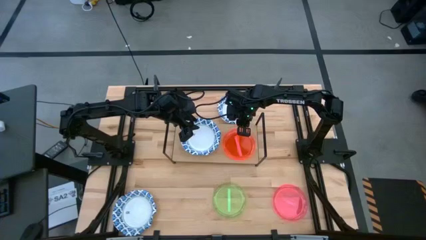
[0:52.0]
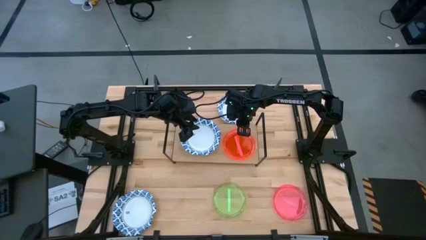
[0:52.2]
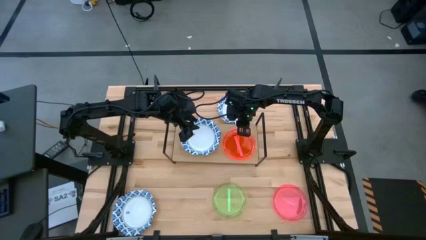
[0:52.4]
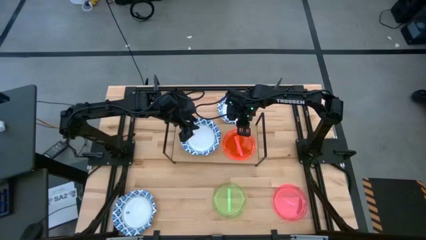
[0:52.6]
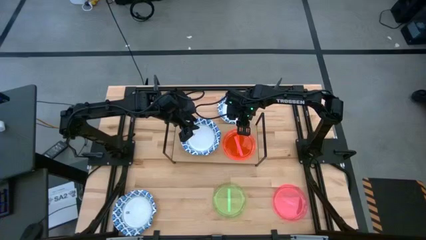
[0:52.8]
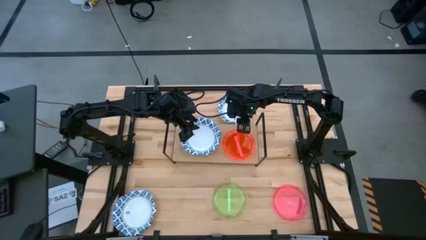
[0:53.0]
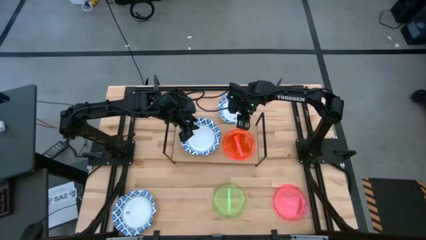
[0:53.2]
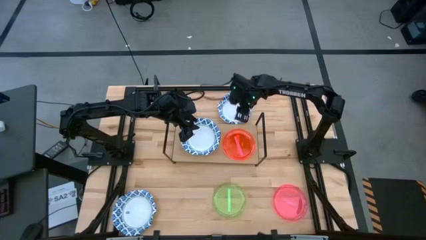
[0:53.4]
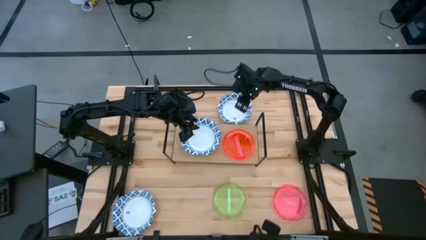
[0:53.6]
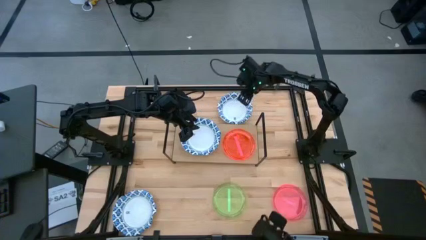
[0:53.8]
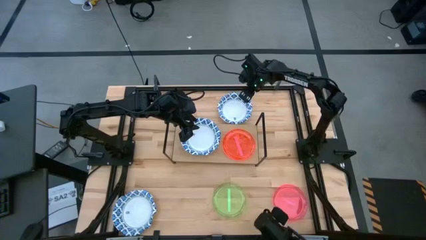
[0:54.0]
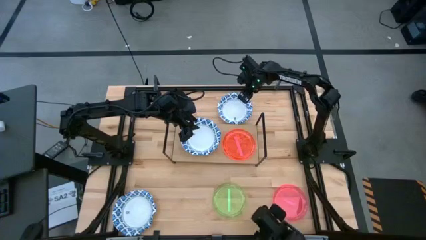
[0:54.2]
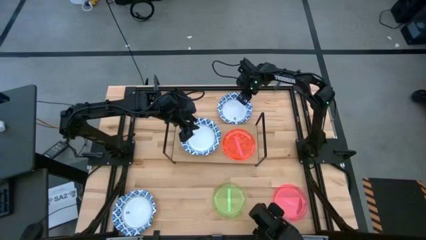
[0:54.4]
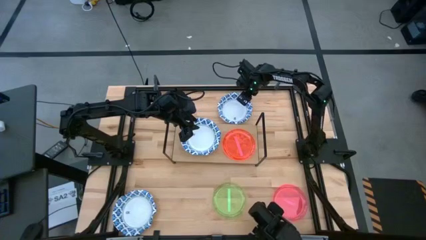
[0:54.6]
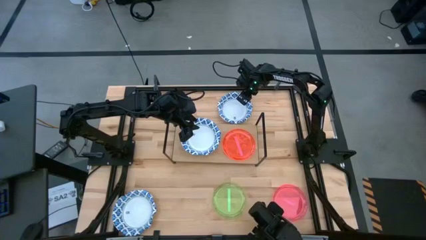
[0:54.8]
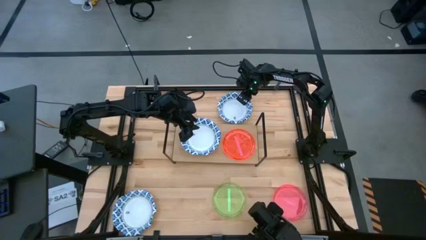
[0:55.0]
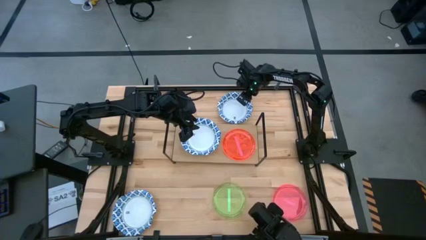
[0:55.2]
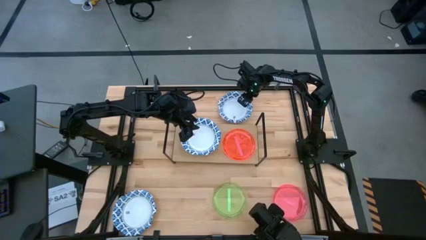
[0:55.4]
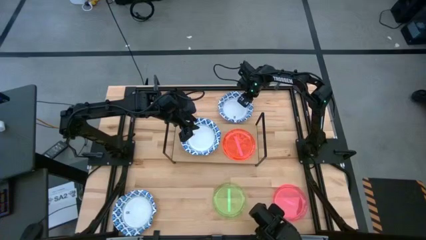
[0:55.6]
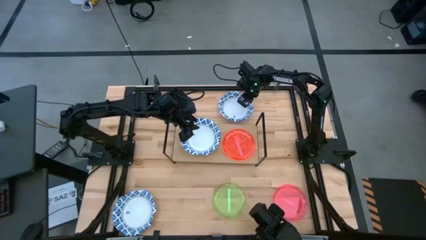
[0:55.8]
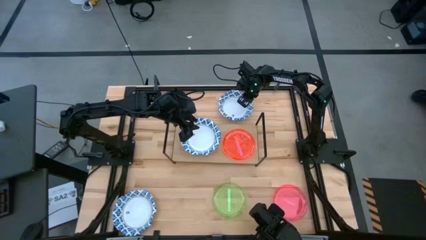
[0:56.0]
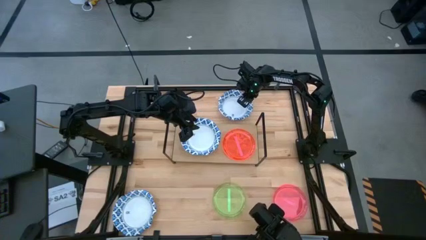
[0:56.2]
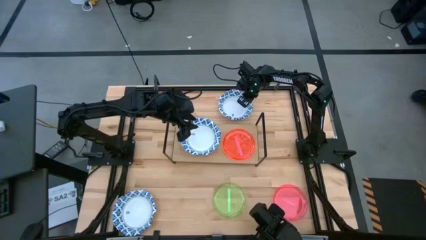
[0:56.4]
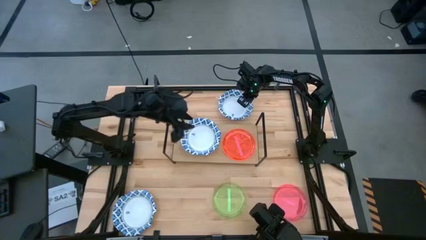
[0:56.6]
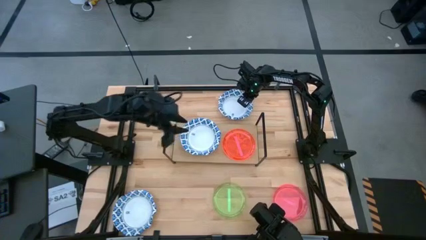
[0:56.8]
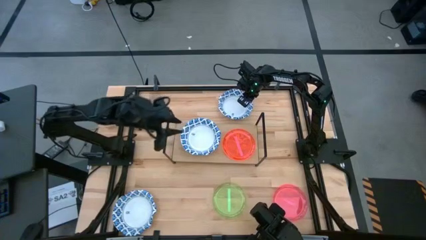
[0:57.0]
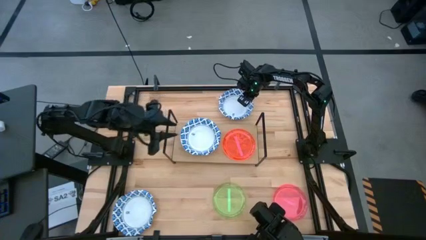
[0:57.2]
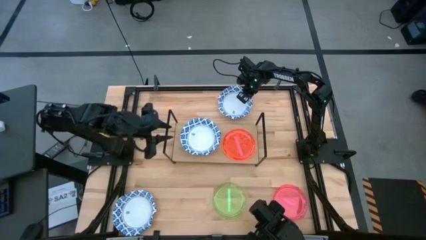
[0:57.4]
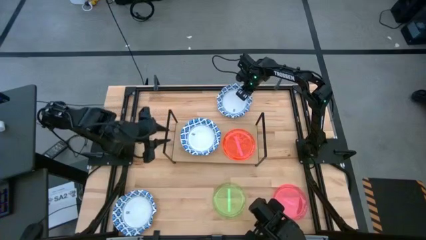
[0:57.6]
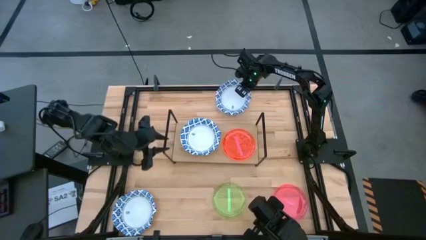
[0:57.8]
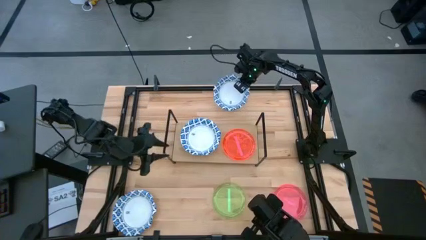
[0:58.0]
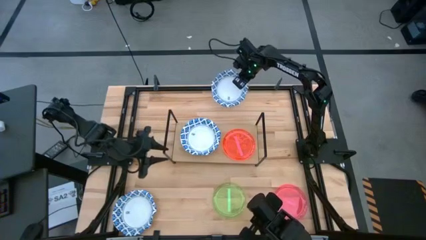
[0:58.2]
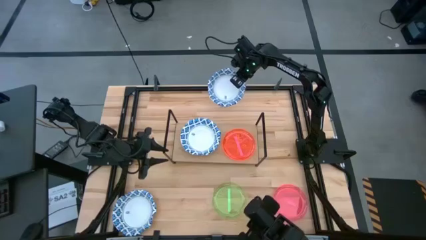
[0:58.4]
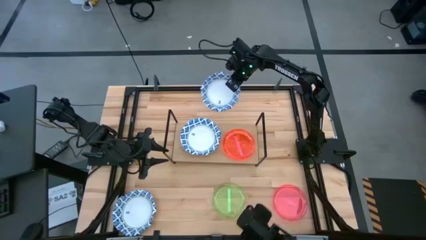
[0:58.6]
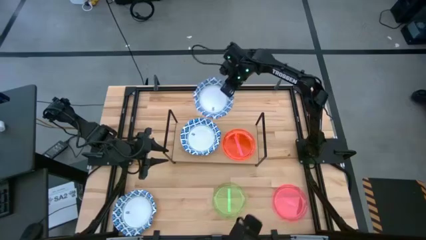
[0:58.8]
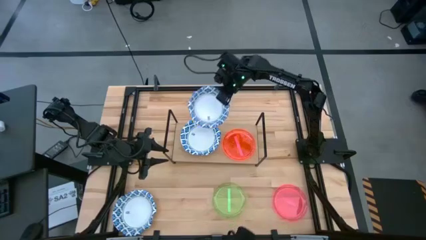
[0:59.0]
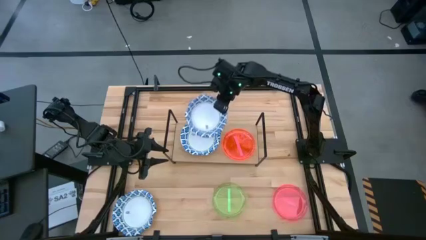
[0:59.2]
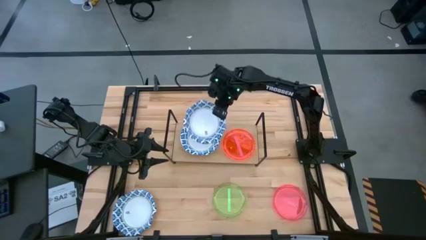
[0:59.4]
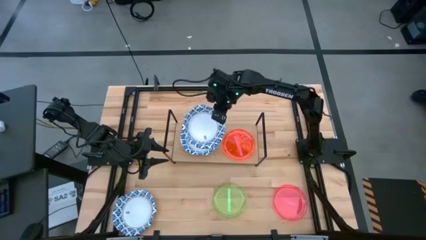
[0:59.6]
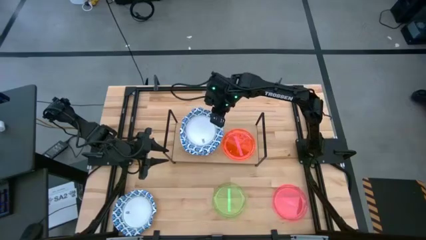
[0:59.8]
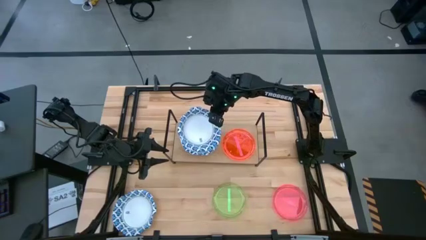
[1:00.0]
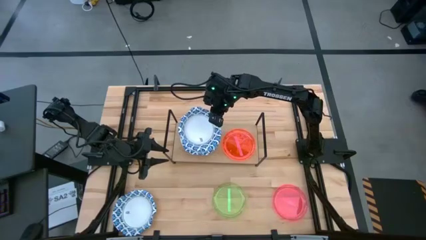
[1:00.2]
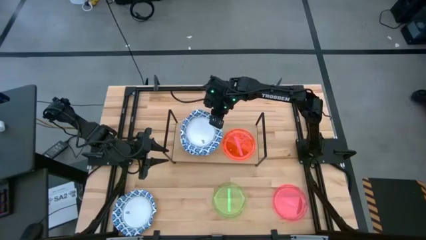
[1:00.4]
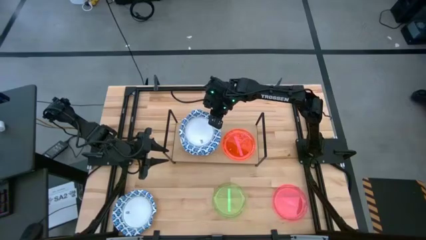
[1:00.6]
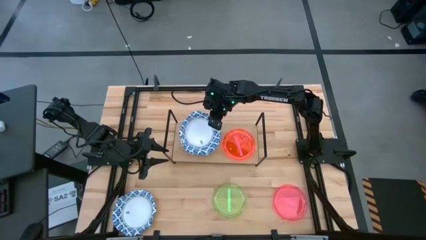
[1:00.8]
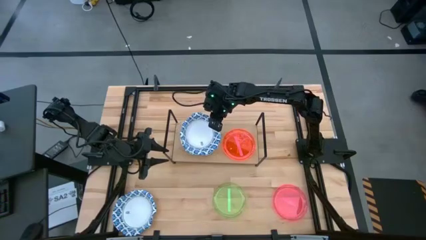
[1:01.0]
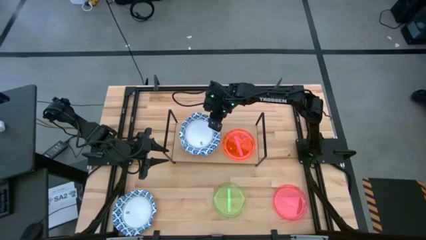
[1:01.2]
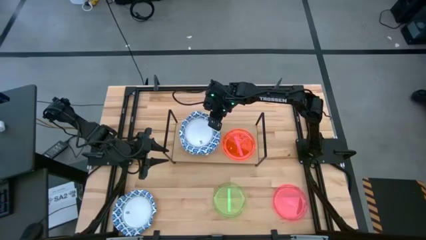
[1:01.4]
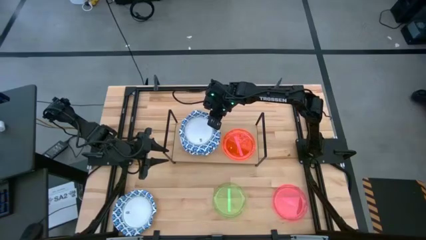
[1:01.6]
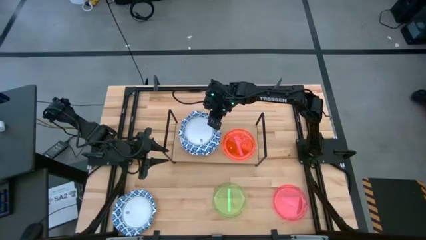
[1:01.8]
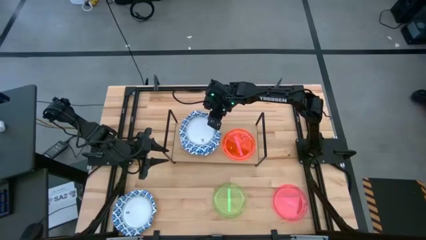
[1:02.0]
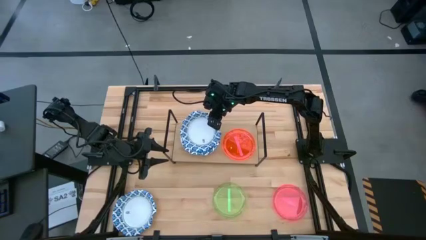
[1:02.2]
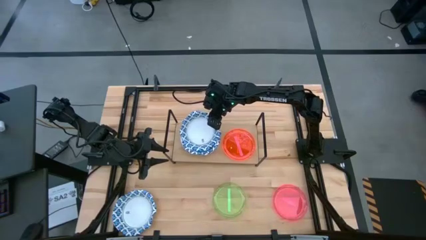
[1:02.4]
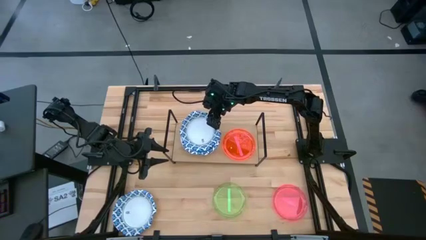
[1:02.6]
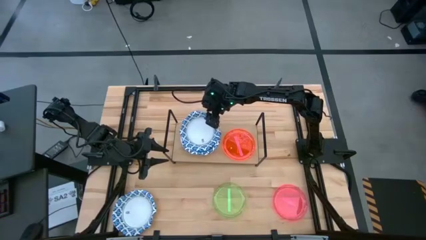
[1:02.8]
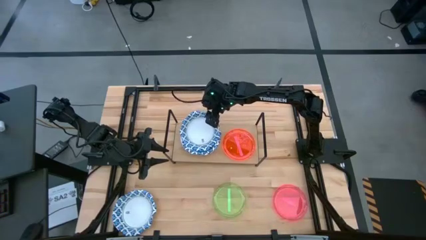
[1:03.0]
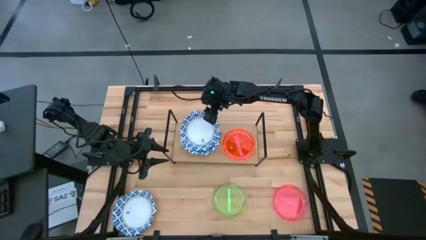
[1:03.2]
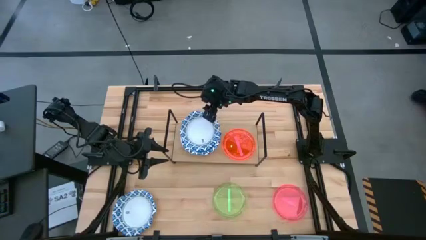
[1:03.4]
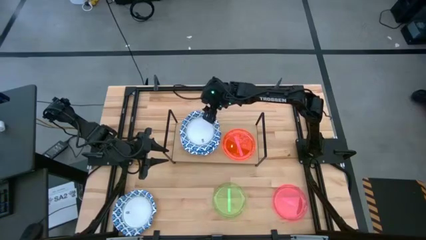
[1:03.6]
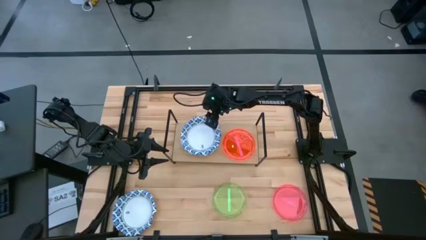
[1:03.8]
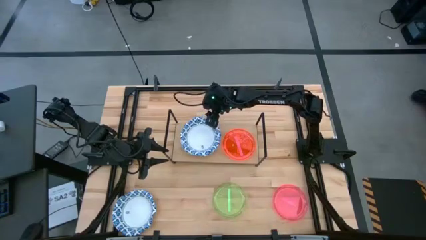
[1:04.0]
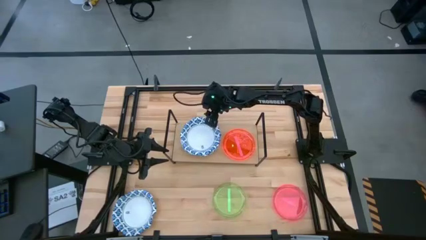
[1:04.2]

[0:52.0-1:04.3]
Task: Place and stack plates onto a shelf
Stack the blue patterned bowl on top of the blue patterned bowl on the shelf

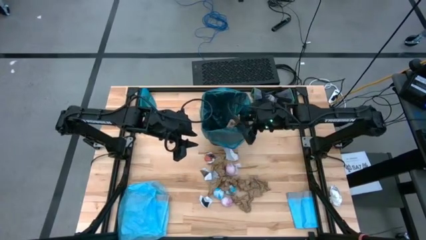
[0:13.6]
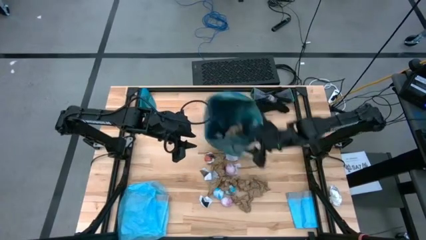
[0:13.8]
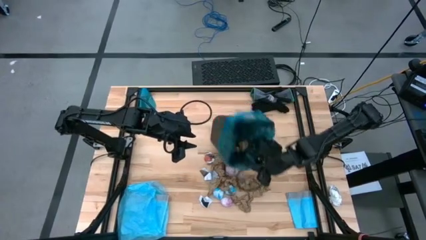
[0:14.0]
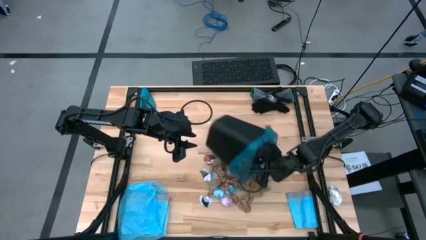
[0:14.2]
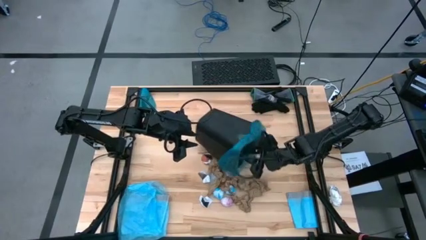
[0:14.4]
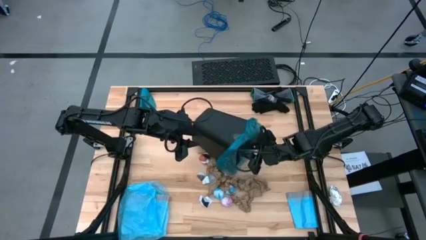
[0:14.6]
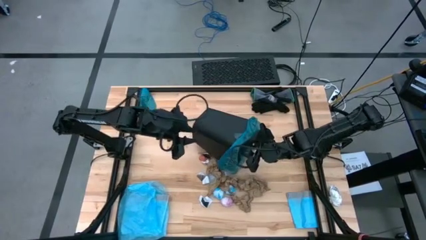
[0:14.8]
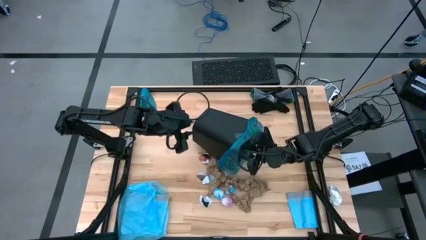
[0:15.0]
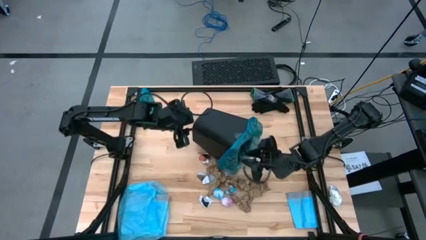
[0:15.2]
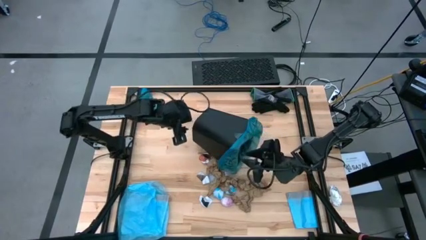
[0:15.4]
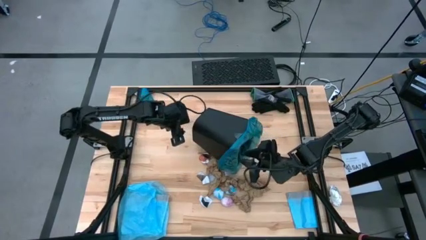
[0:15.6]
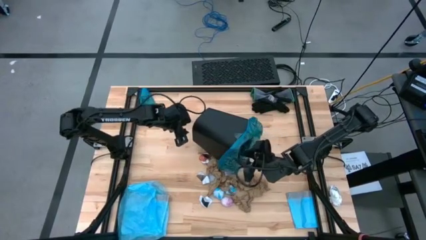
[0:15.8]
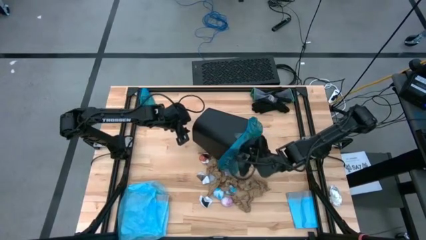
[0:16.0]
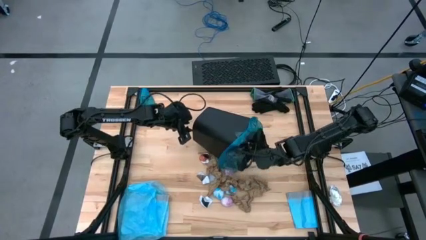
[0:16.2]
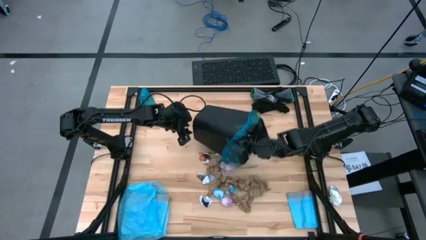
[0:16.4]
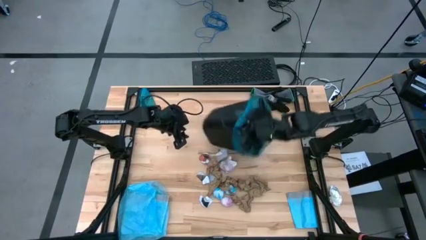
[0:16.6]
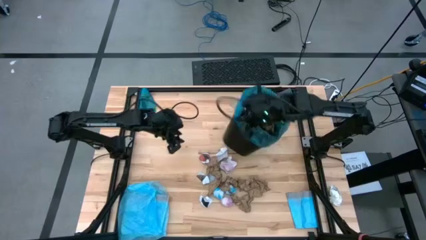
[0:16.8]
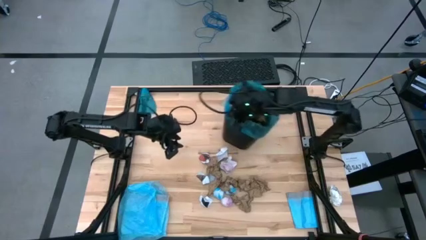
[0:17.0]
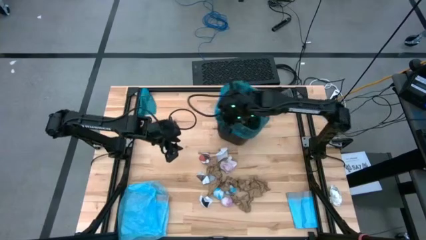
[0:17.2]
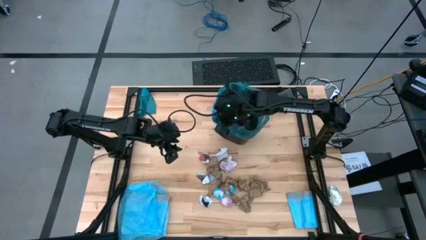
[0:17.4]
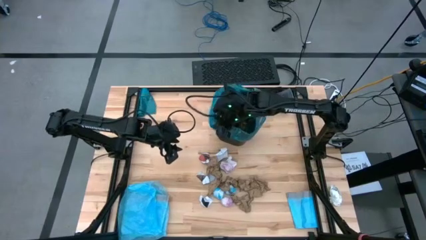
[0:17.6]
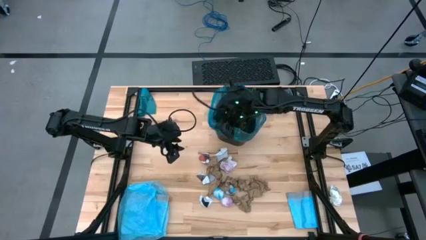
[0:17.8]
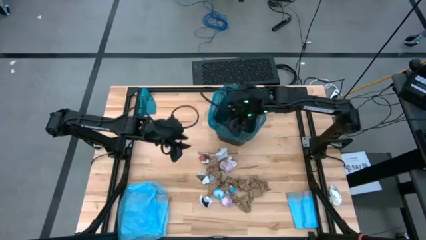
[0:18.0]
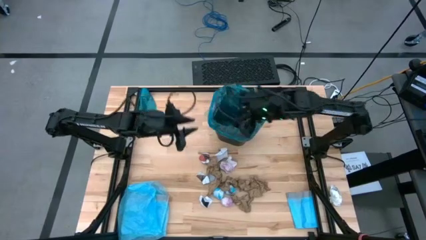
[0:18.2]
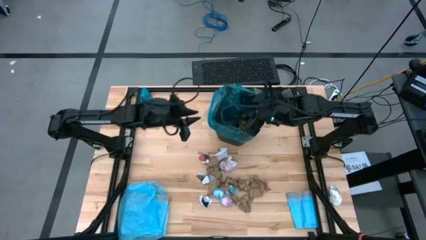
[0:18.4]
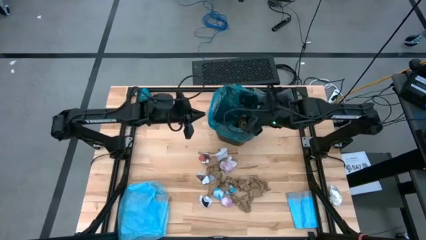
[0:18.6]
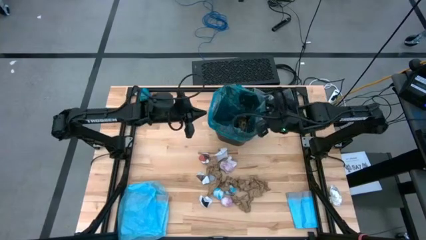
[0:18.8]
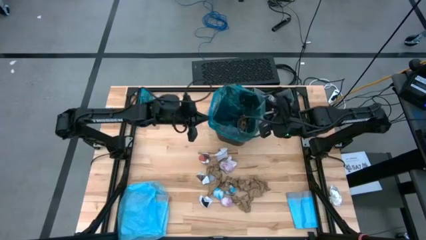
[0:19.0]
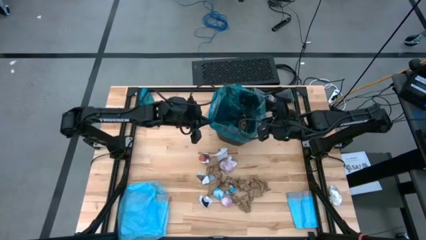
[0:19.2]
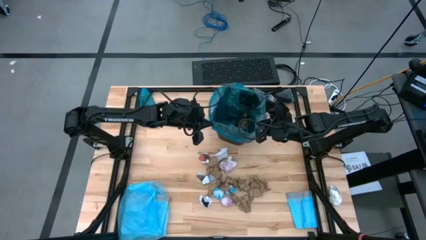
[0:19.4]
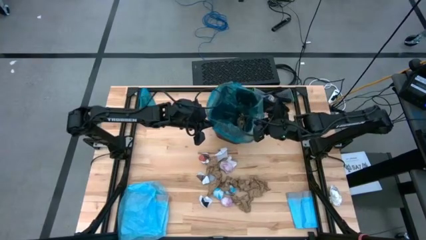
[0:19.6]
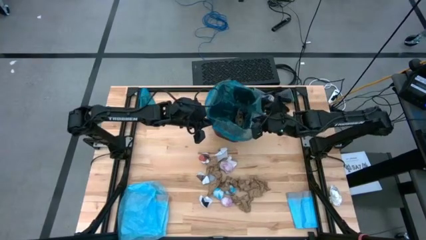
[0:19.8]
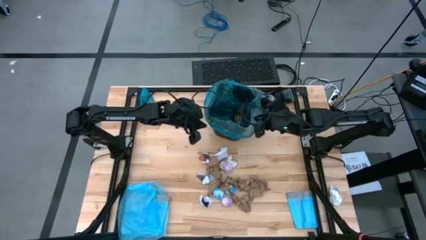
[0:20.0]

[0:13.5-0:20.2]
Task: place trash/remove bag and relplace
Adjust the black trash bin
